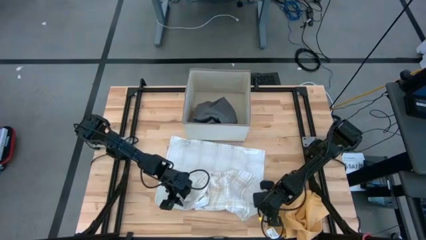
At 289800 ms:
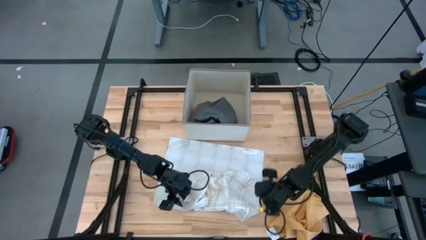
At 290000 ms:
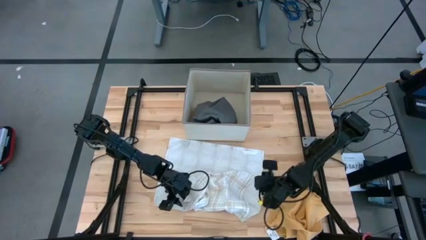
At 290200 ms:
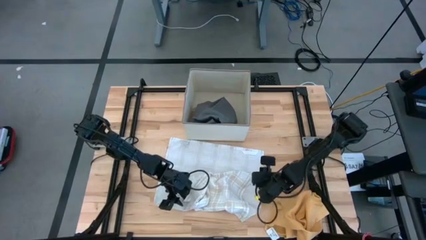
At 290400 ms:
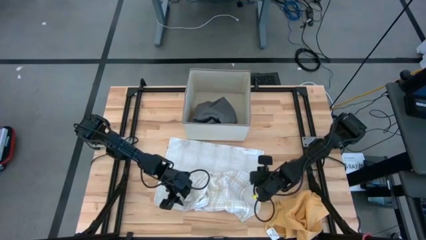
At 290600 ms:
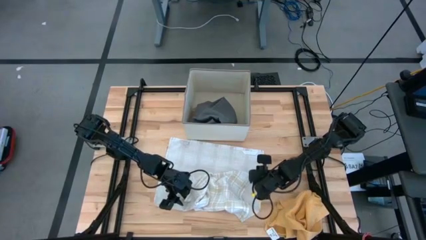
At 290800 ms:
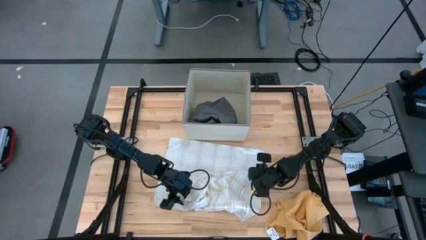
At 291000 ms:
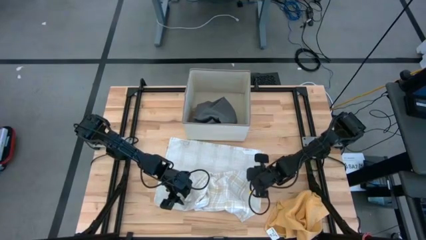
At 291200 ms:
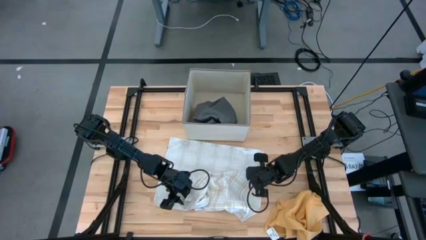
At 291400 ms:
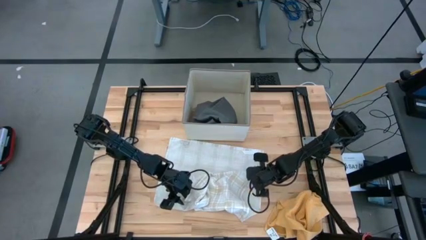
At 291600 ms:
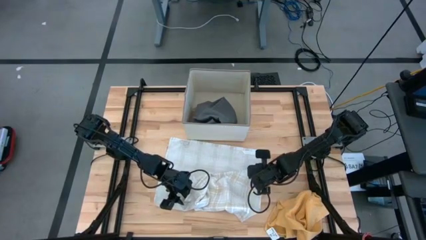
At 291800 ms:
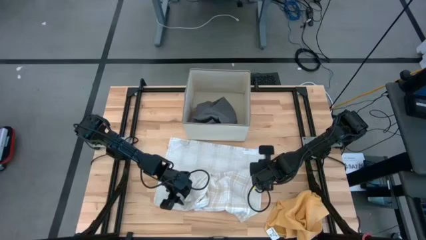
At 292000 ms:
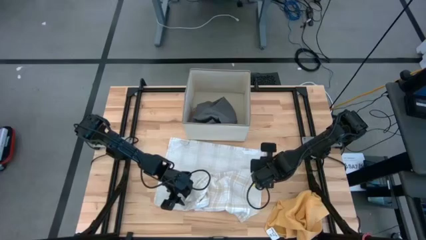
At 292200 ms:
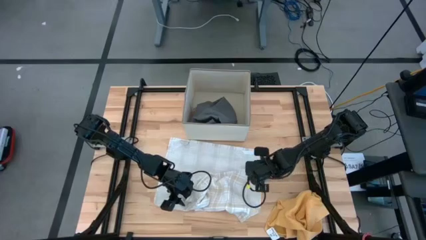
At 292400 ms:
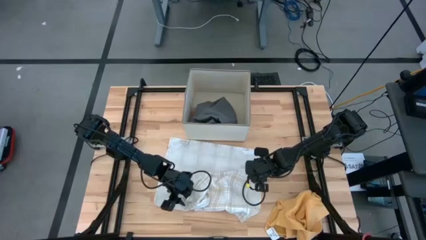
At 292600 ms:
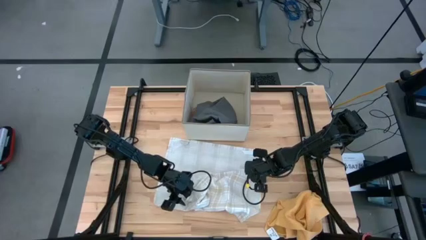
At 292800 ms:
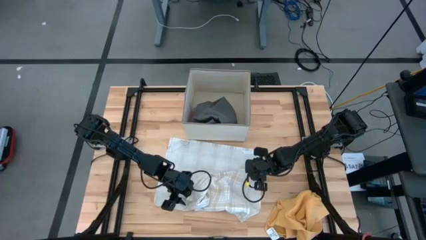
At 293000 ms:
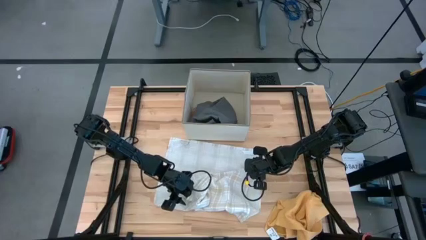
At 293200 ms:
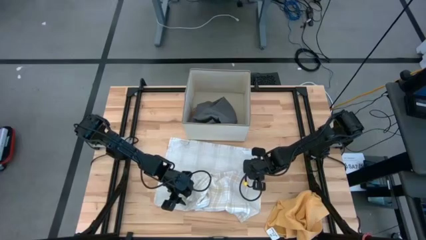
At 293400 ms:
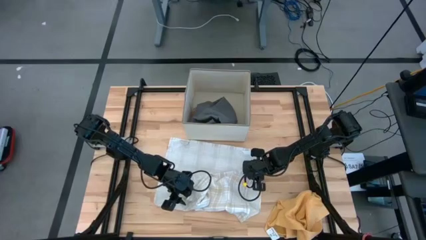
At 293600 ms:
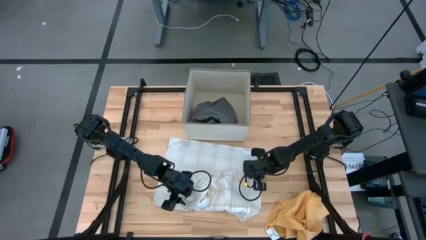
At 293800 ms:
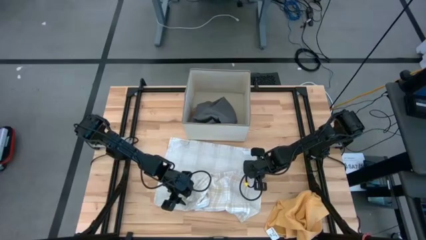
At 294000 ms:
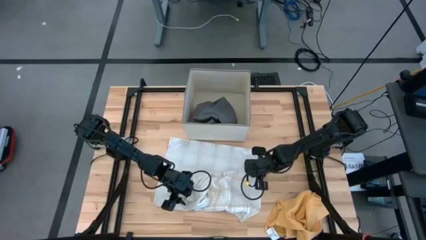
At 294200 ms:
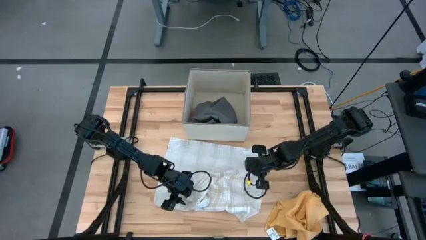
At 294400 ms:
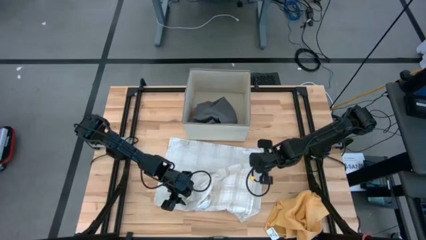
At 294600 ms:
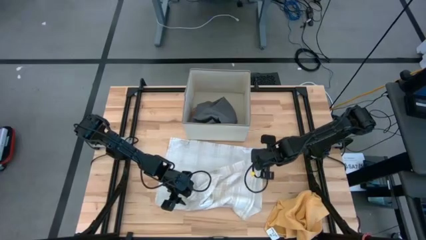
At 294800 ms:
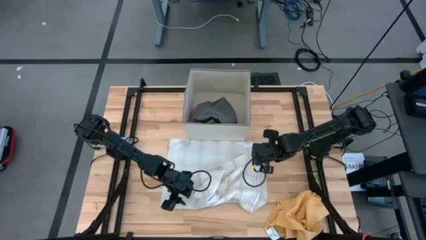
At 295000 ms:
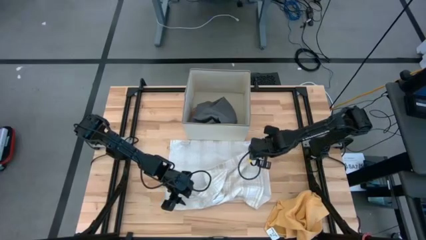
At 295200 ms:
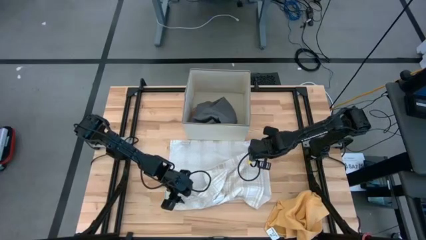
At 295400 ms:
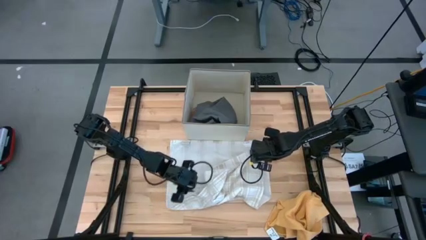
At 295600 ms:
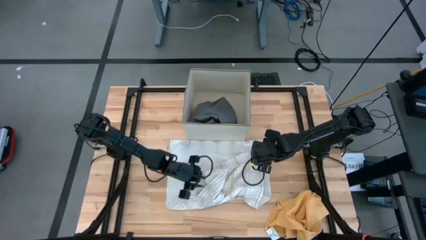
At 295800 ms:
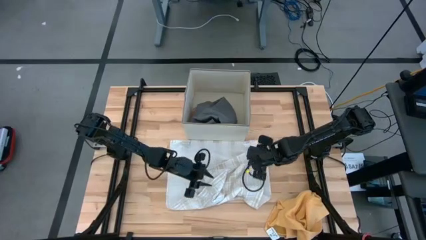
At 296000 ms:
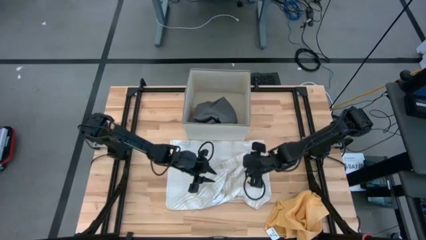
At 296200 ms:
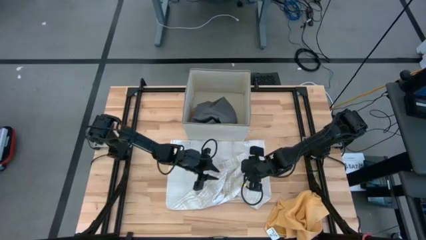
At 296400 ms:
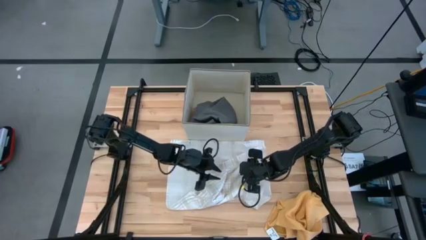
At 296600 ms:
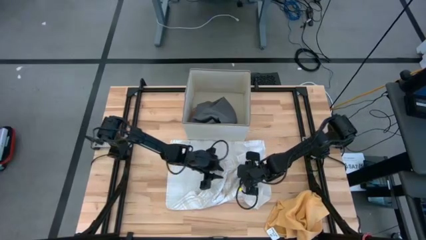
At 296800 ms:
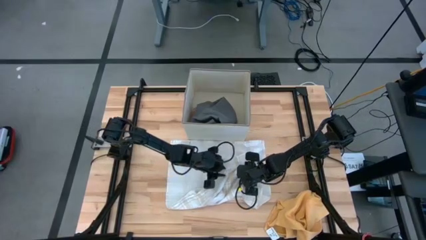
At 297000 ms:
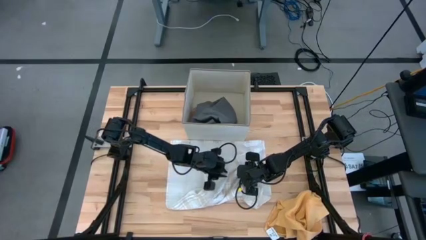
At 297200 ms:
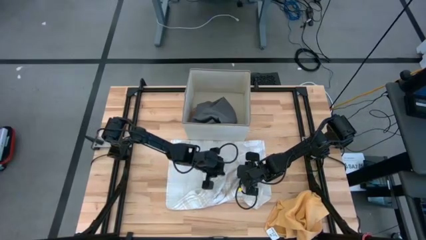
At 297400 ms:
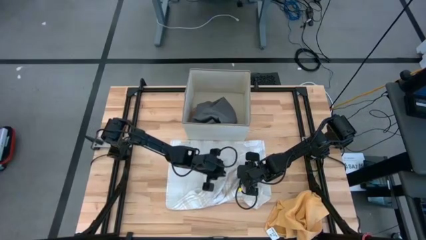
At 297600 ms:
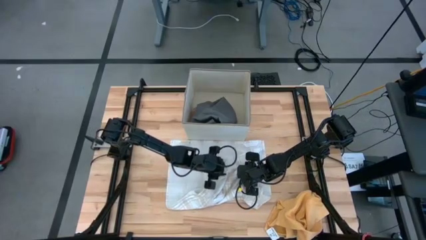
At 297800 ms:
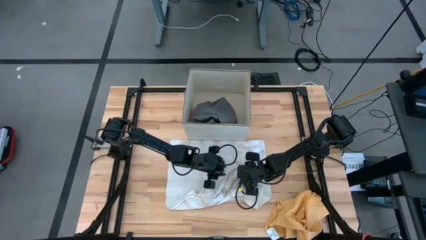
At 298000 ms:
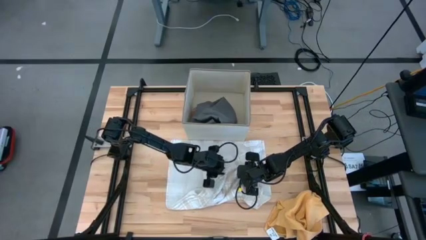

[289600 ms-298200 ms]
Task: Fold towel
Fold the white patterned towel
